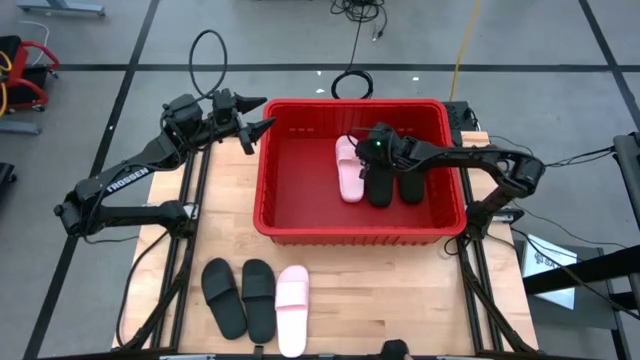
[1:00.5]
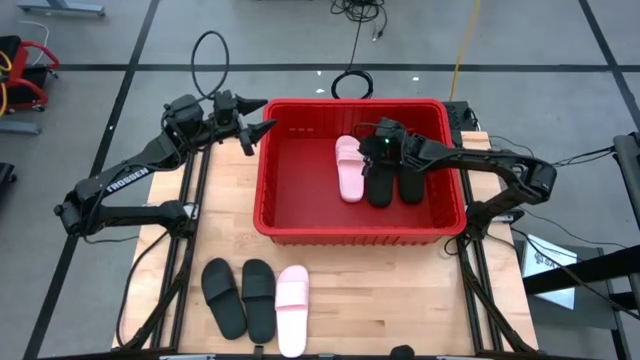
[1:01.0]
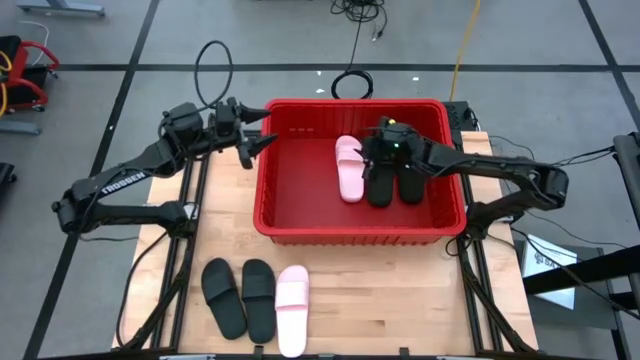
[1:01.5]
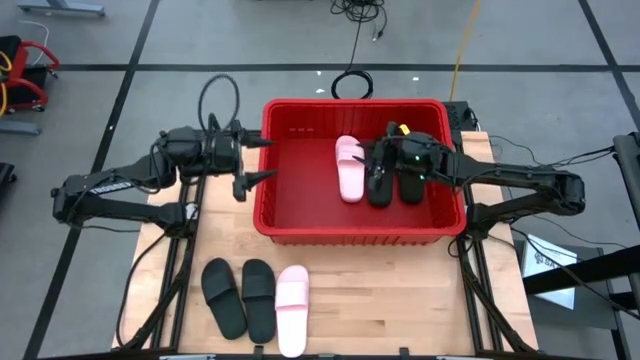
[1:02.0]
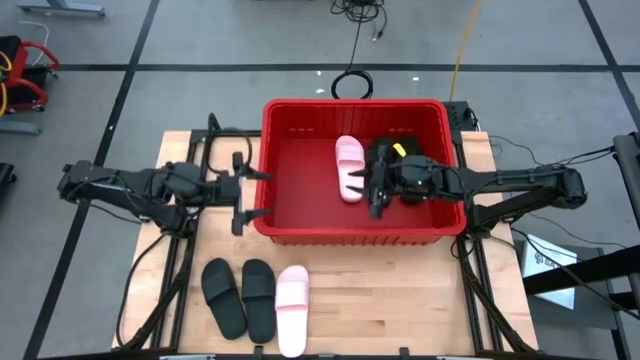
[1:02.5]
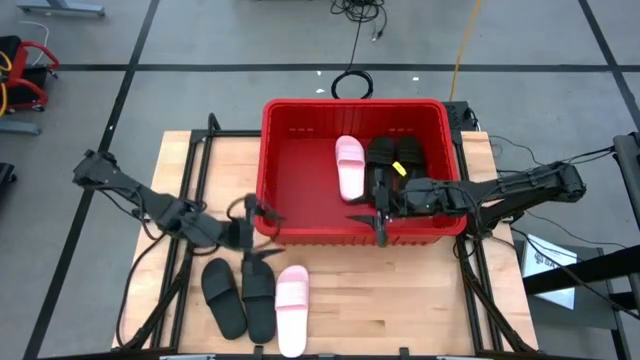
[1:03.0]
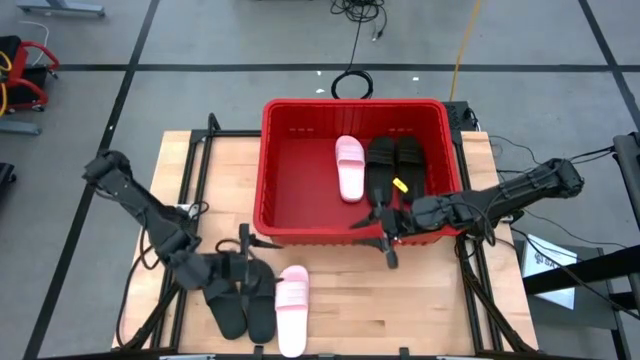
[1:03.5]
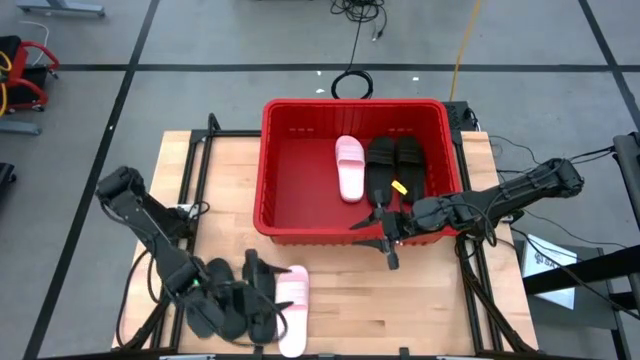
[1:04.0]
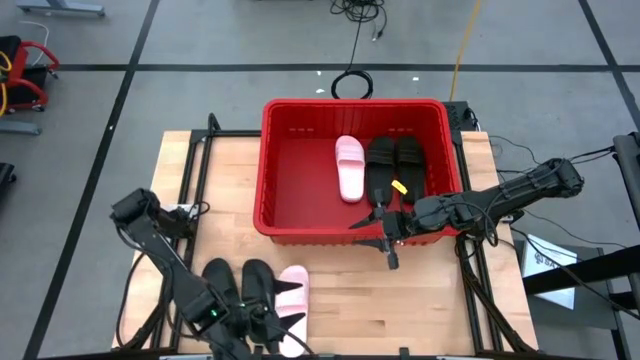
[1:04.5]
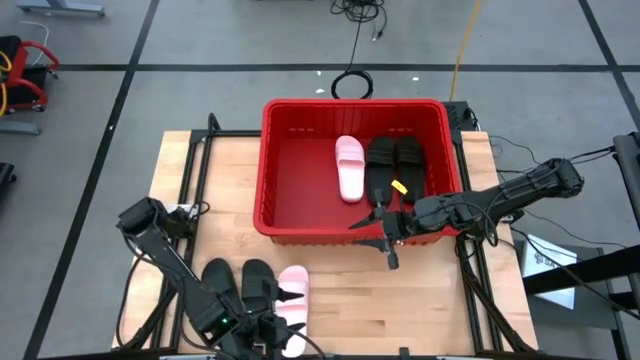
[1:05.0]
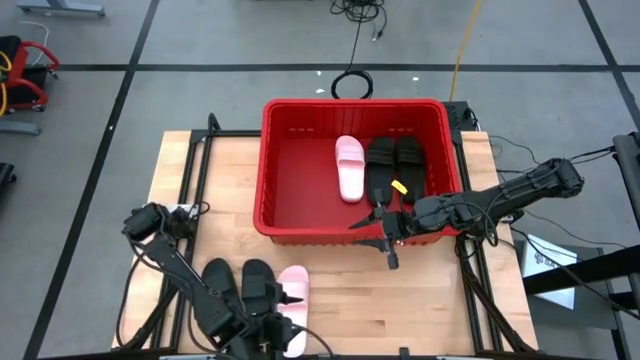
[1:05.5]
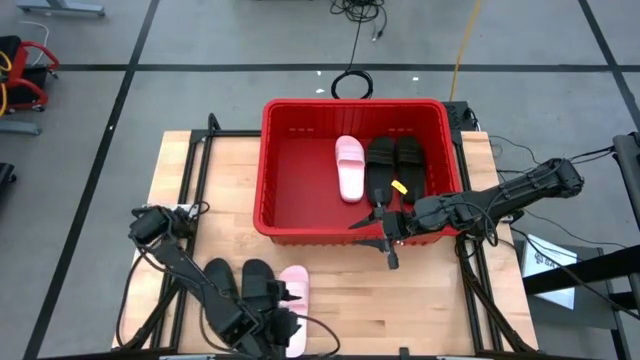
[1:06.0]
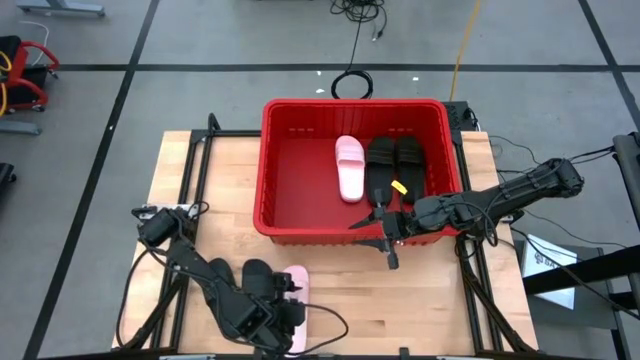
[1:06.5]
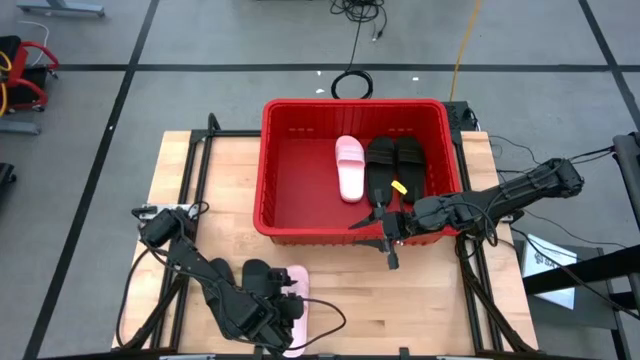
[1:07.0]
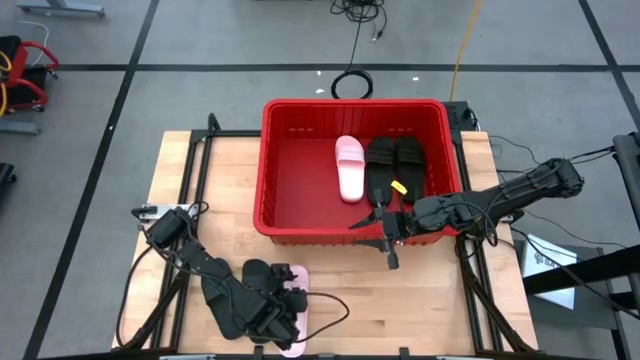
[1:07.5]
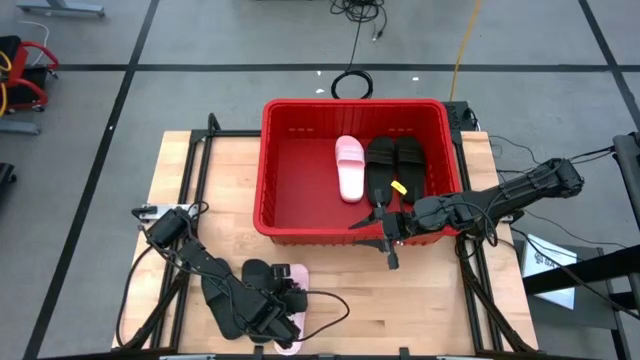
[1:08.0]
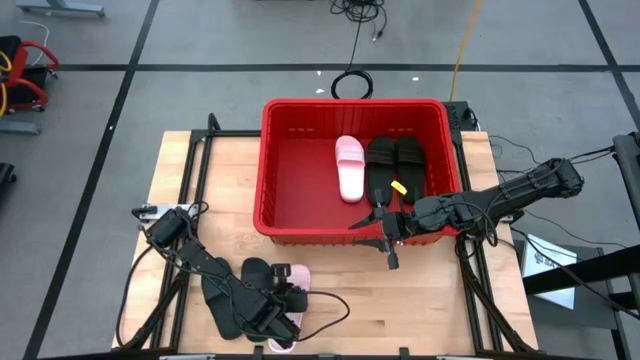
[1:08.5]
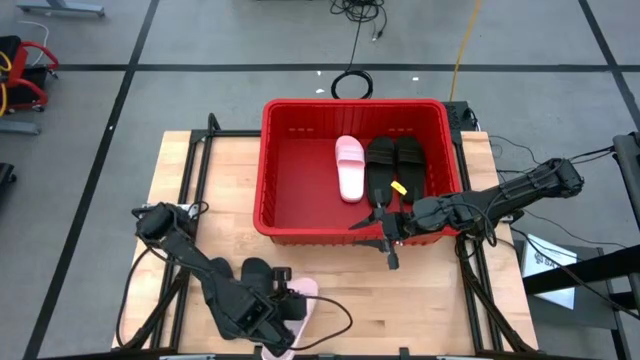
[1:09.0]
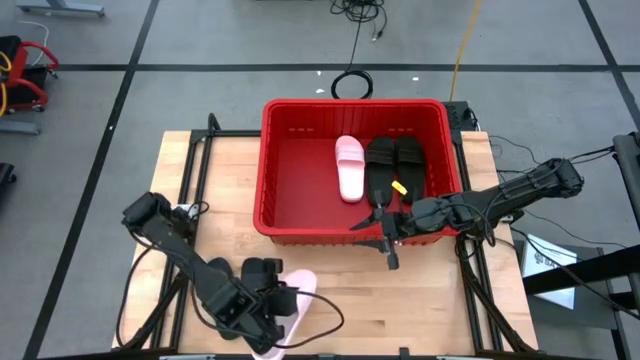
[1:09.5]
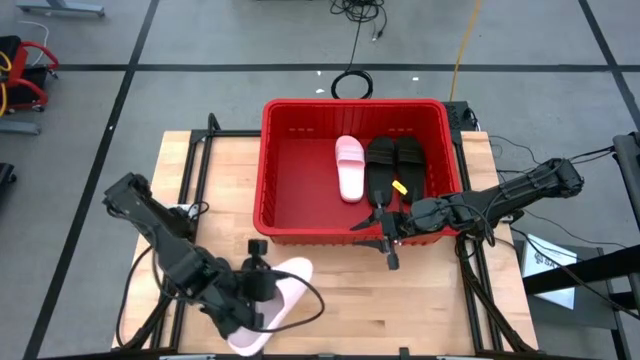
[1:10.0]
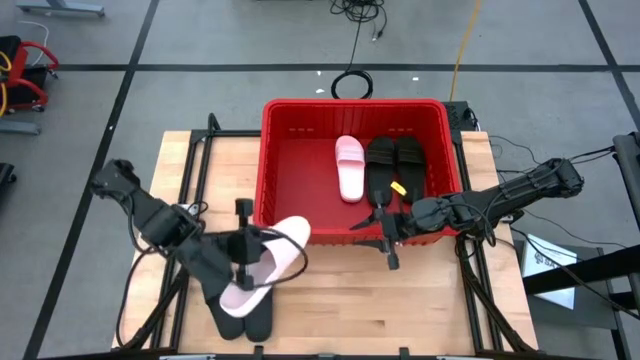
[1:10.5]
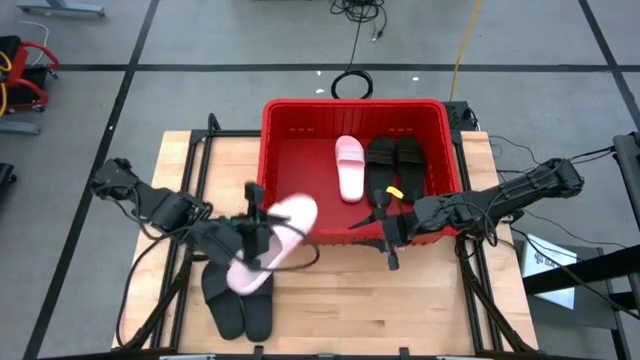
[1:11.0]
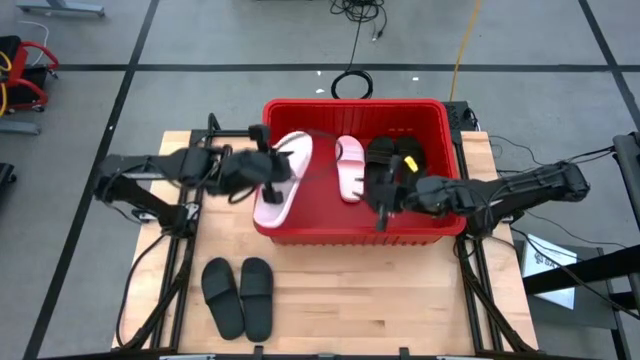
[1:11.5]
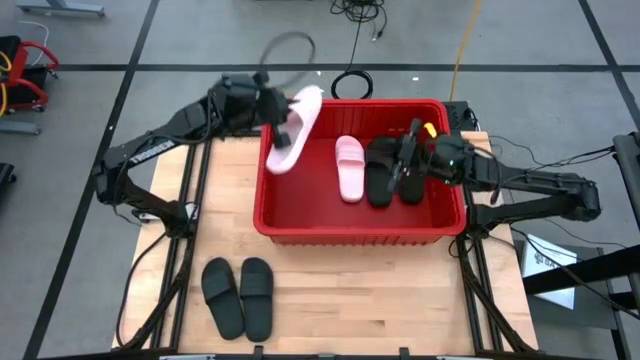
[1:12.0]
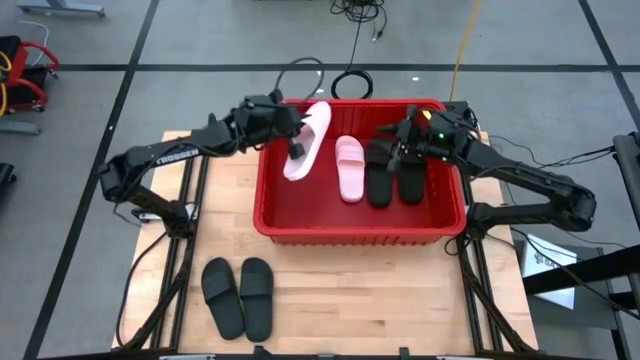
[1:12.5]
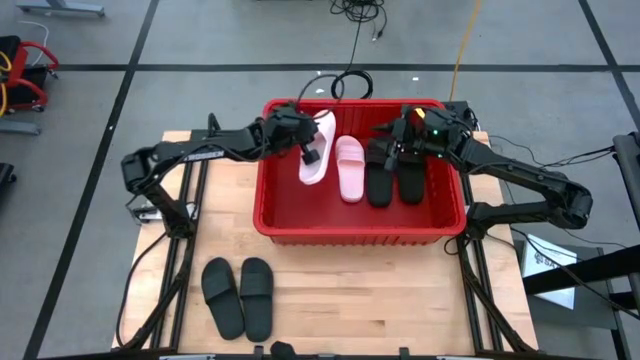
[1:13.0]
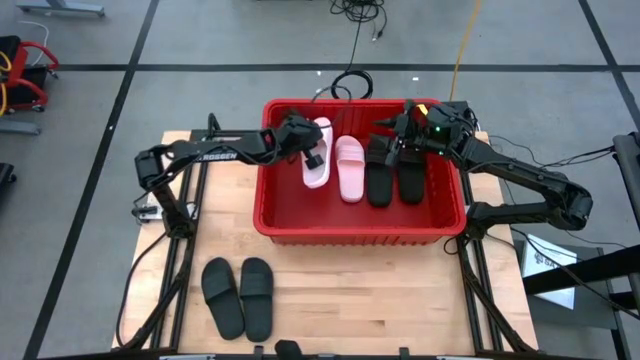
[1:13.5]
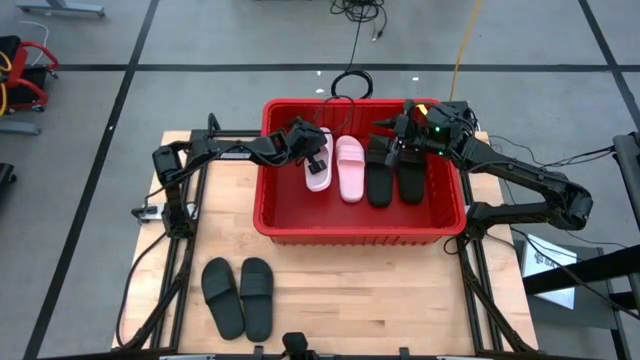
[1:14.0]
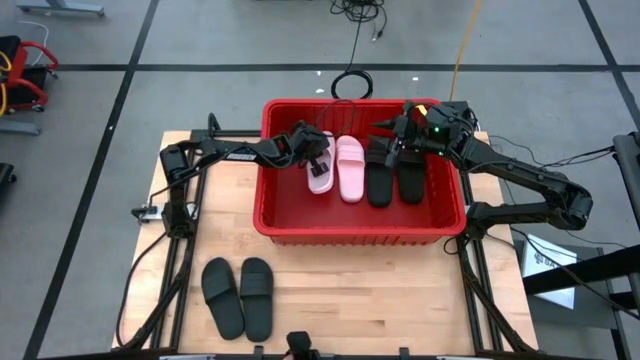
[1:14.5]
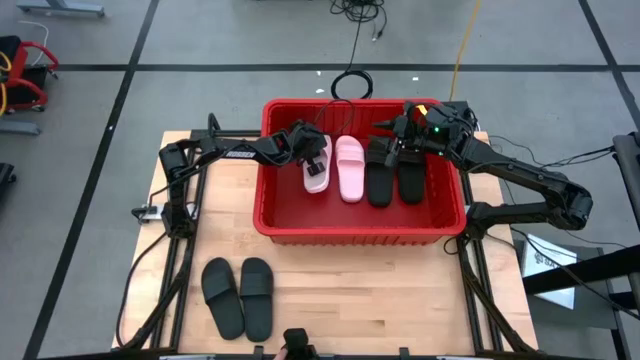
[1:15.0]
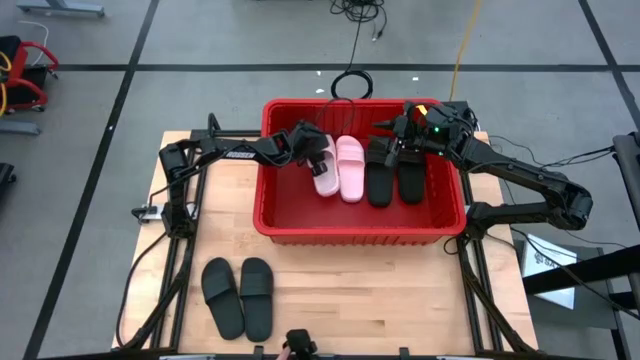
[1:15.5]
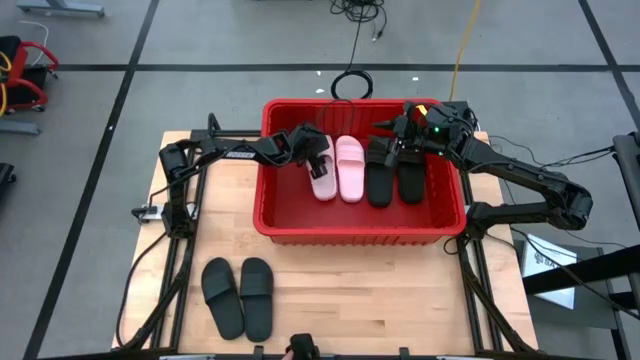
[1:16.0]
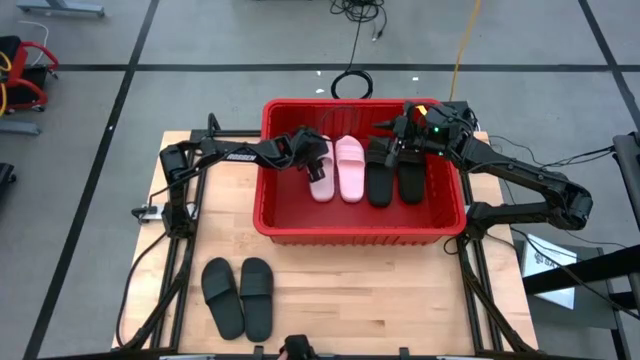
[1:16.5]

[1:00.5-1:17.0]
Task: Pick and place slides into bin
Put the pink slide into the red basket
